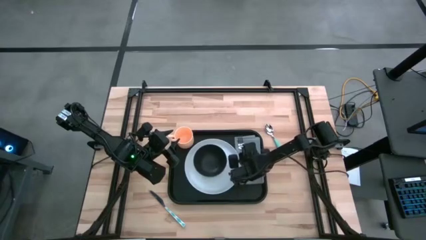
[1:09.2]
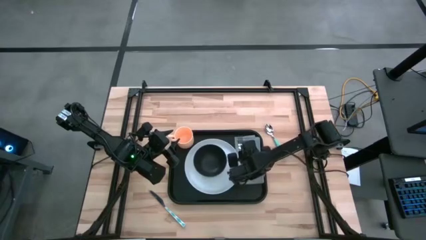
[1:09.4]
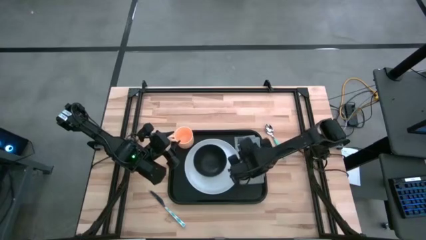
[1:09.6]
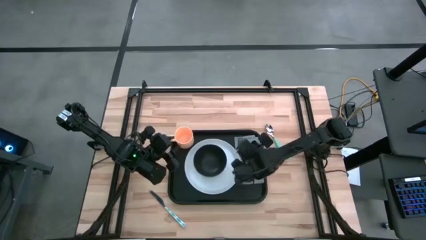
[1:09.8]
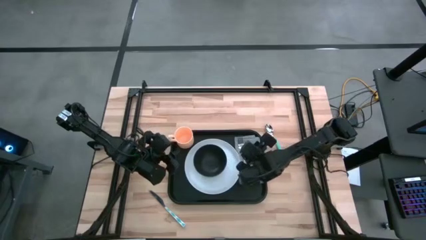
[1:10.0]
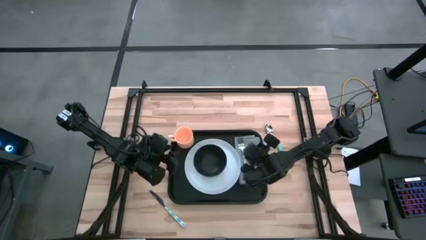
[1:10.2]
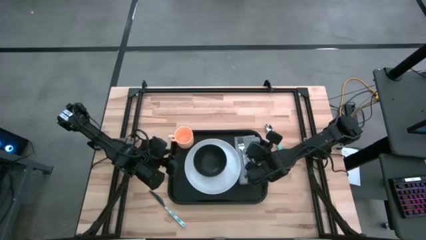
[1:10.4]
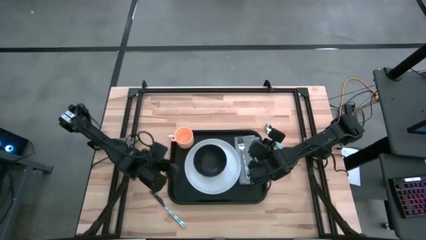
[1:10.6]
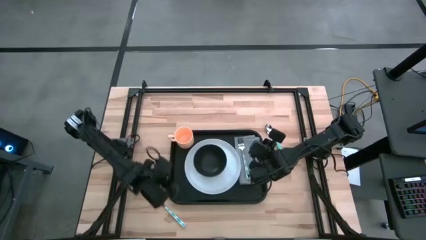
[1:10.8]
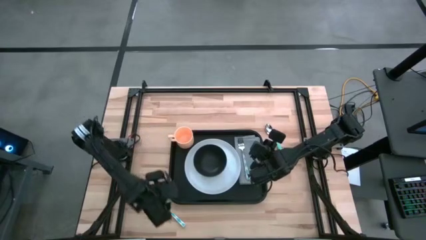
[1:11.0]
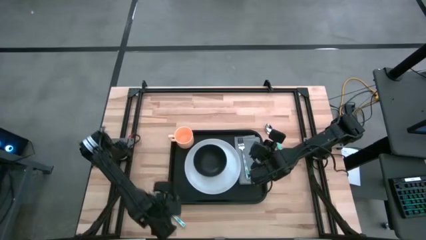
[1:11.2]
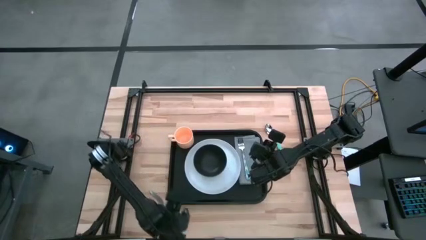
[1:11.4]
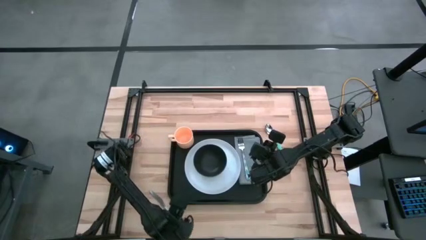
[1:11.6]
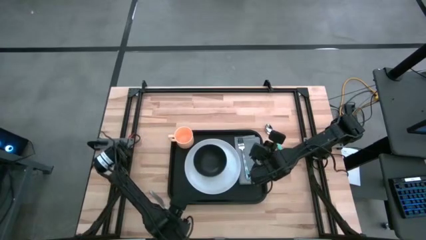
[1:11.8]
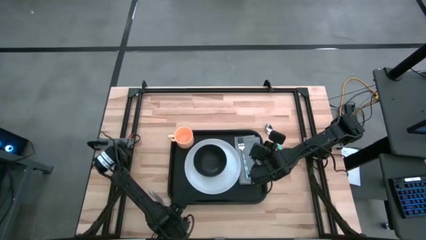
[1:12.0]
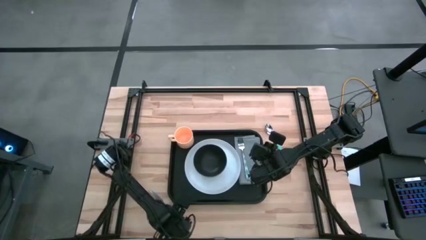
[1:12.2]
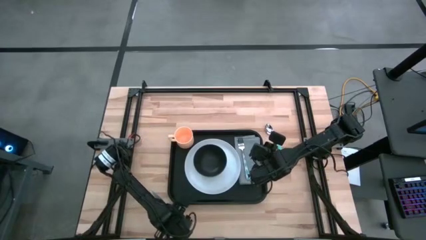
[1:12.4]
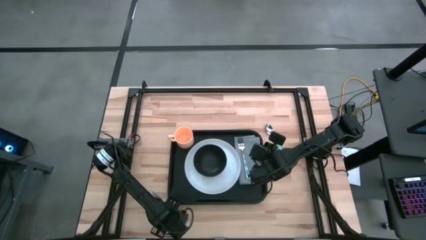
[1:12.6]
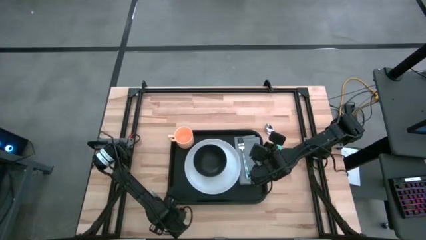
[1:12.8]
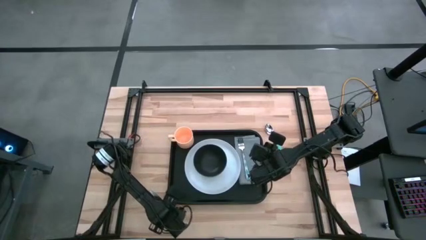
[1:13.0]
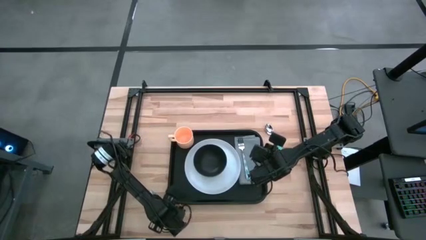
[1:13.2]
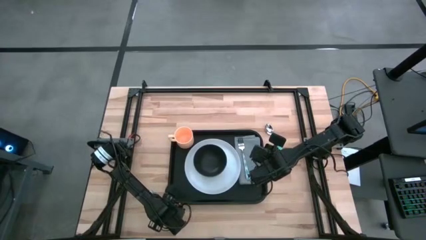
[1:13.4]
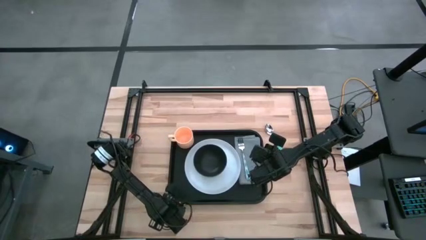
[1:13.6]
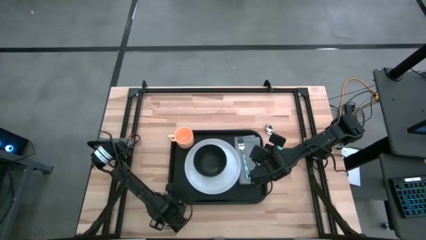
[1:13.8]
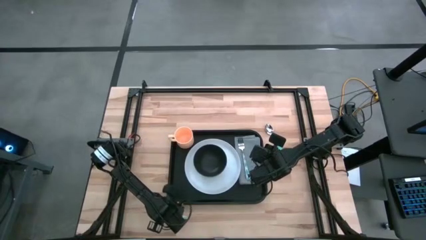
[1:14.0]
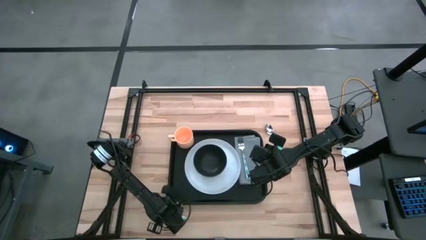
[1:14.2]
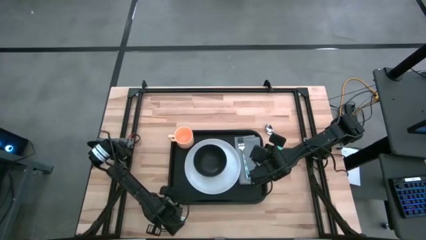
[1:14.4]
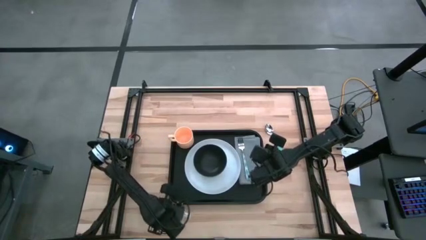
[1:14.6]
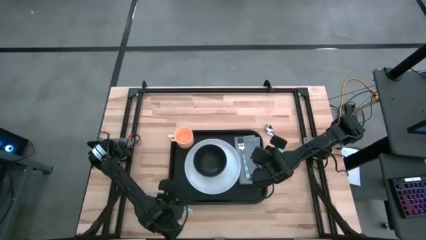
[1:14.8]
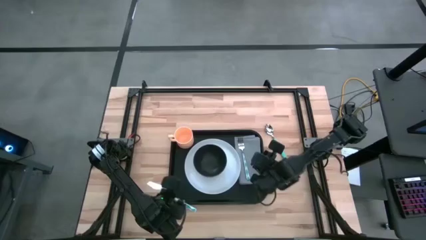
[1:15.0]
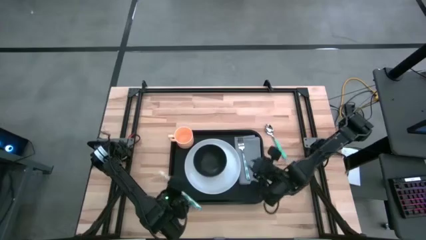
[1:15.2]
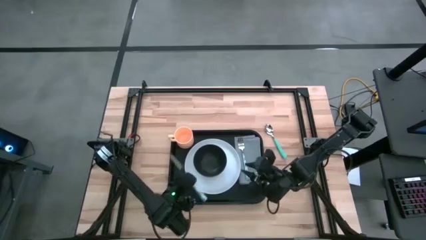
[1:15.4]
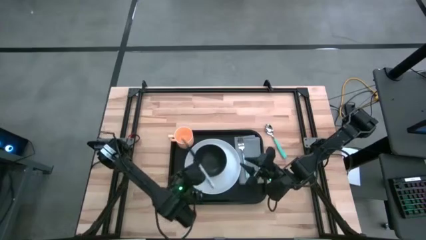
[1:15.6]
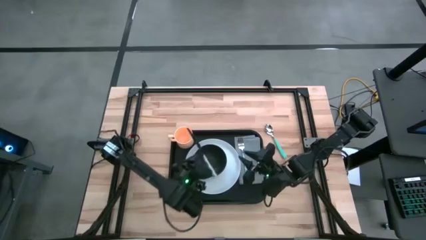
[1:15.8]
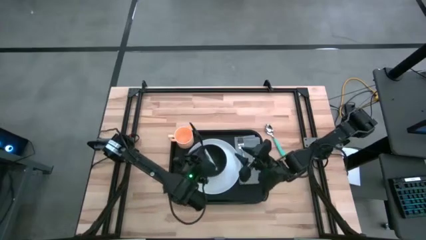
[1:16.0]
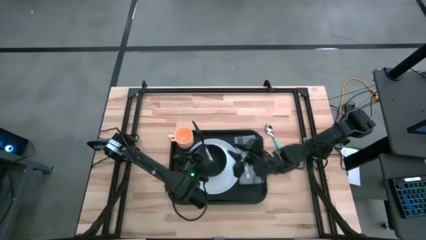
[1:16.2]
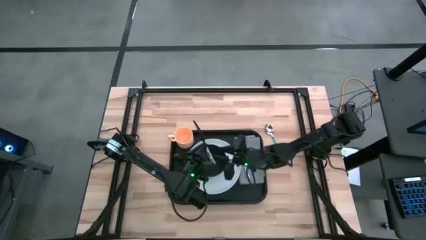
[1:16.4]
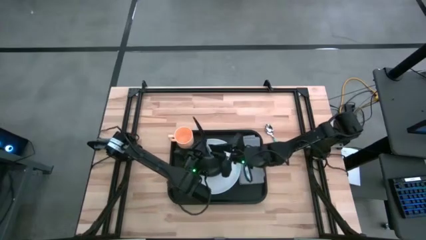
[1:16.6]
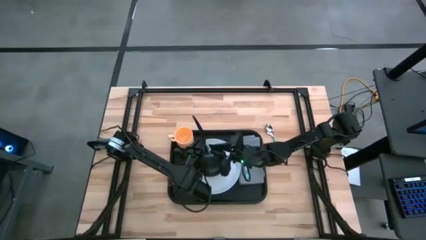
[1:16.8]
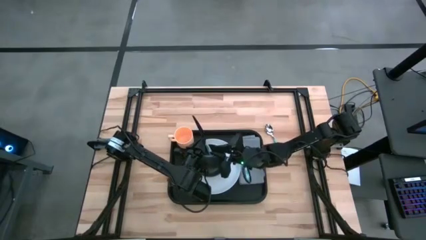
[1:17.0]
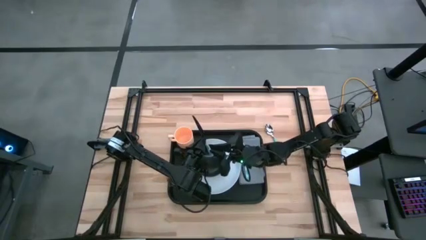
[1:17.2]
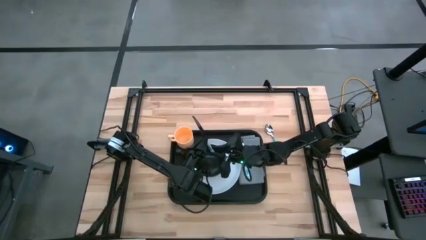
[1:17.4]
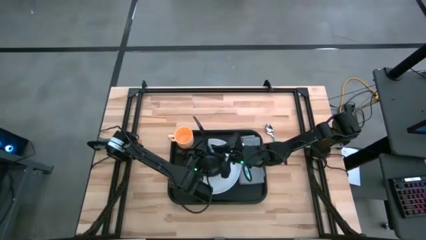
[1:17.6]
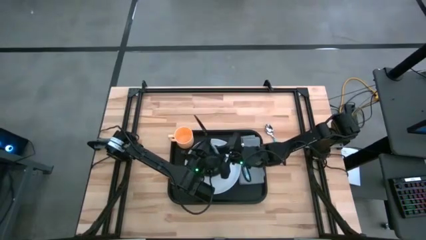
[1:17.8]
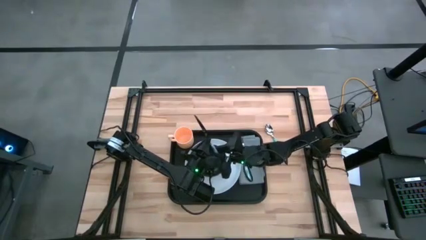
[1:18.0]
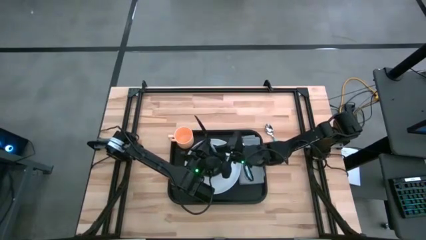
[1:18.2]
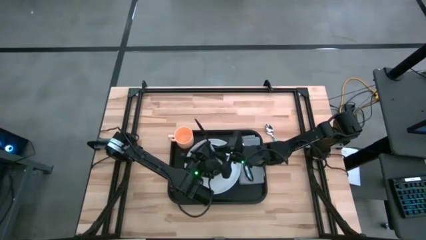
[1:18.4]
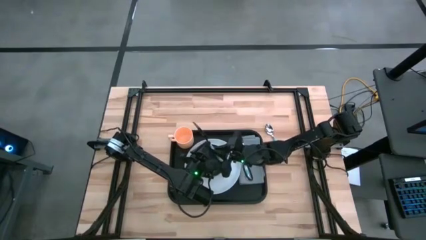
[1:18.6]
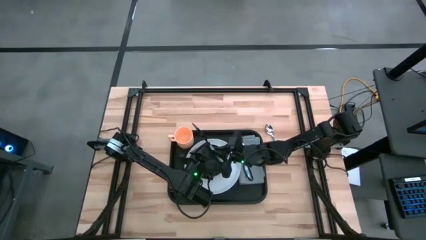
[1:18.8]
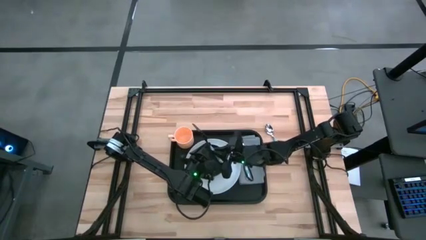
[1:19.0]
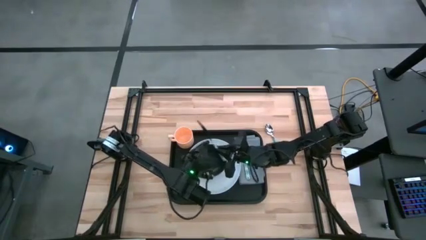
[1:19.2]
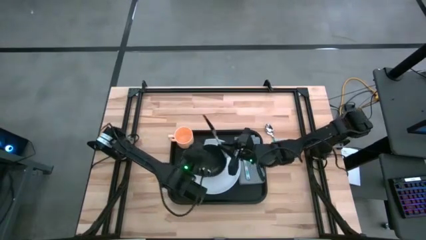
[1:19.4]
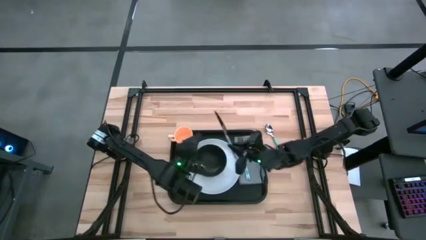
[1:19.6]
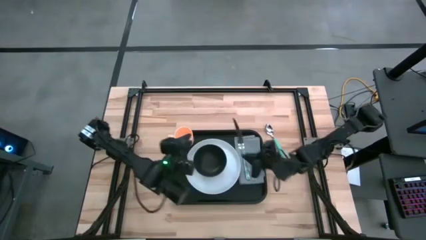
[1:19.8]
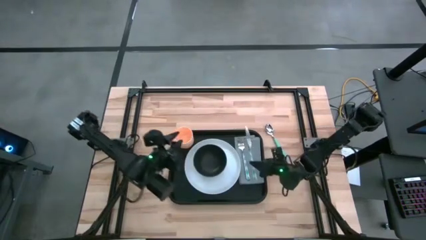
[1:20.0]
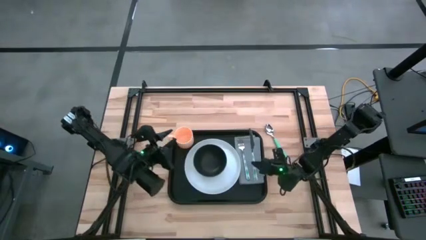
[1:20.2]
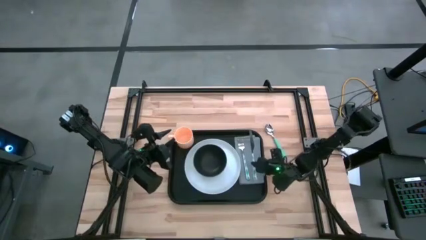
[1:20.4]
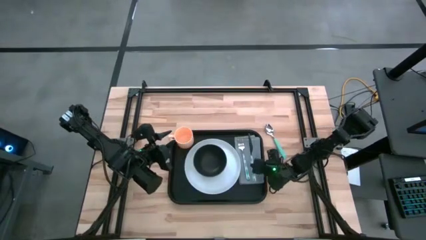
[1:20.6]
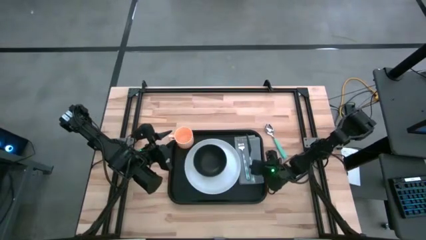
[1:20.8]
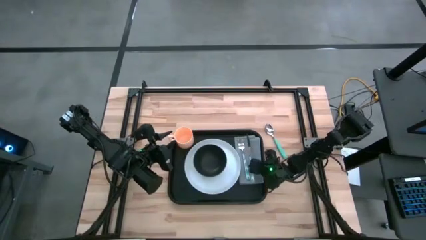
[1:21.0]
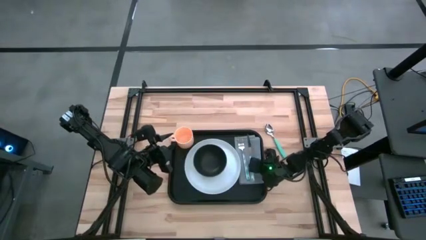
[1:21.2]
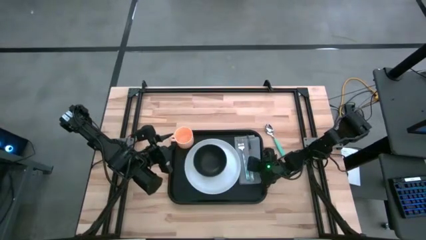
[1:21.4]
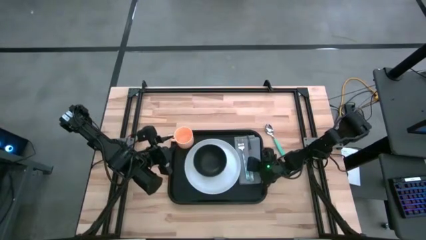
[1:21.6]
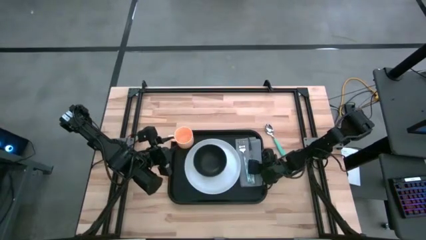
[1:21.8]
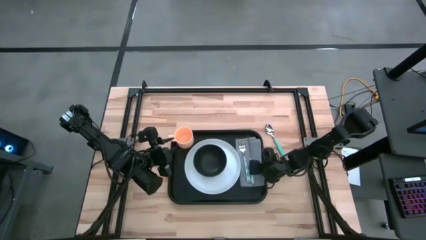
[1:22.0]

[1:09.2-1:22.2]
Task: Set up tray
Put the blue spoon on the gray napkin to the right of the blue knife

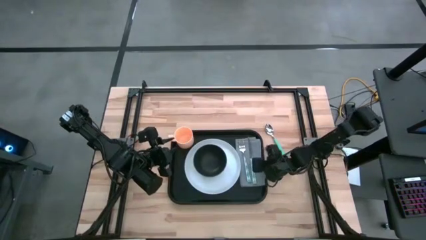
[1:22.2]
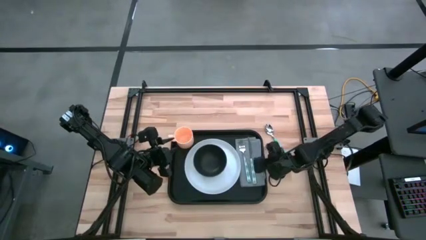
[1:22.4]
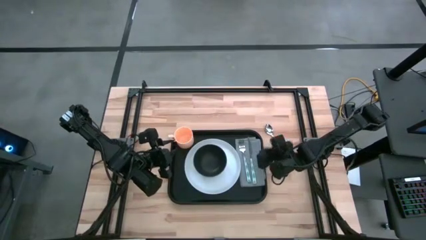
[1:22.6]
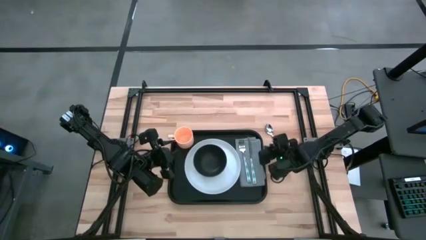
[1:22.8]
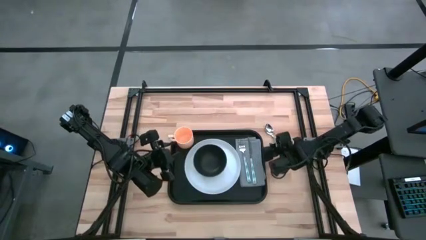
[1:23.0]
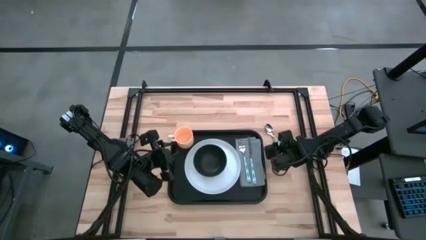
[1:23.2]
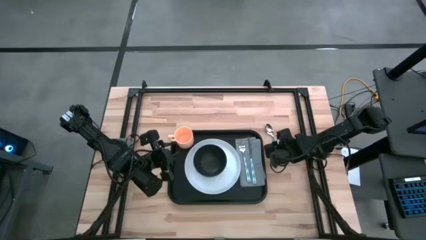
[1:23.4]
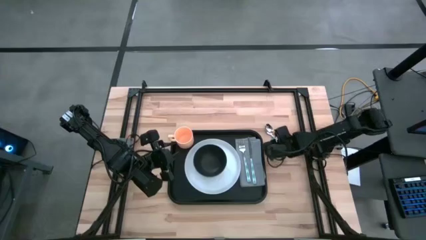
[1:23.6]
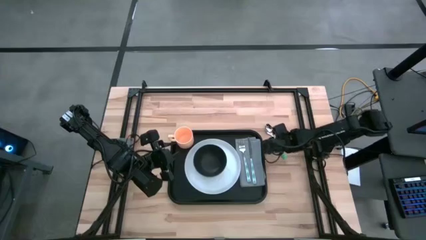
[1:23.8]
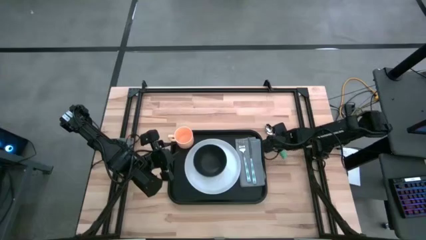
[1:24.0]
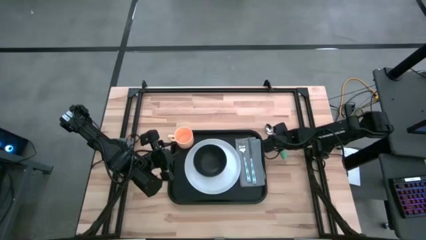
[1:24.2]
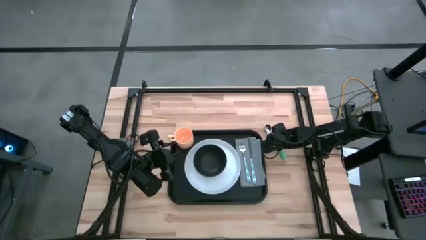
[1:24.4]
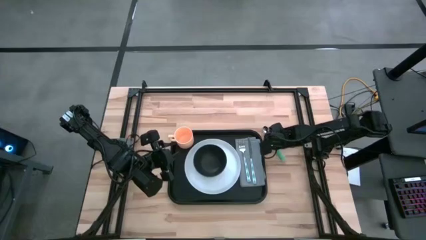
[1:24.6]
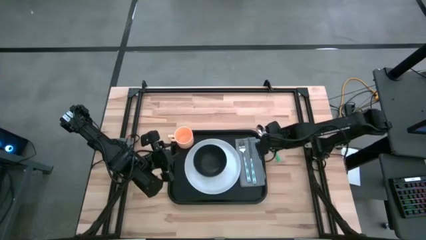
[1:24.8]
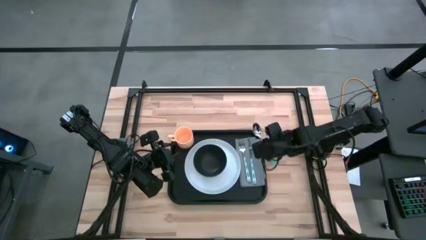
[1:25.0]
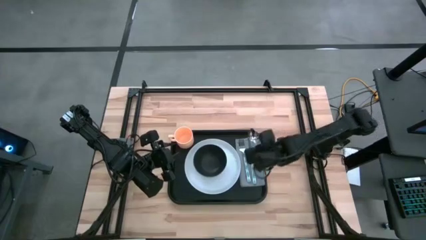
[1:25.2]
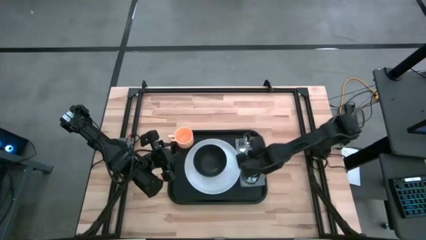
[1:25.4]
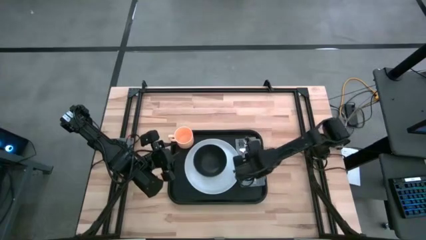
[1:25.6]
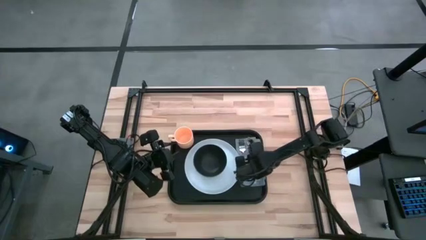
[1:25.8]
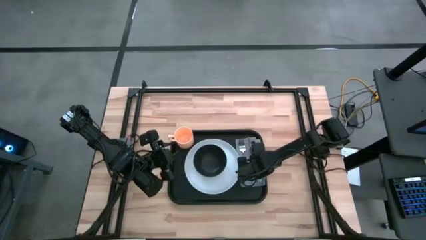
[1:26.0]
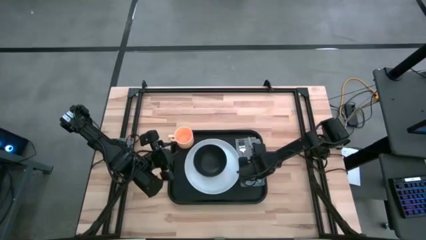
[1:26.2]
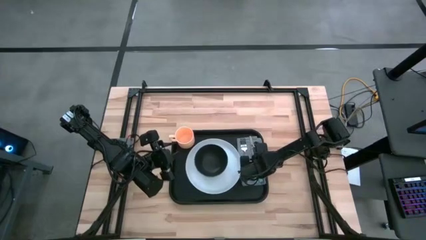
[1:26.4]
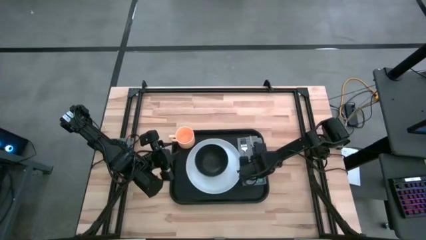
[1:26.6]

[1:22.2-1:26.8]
Put the blue spoon on the gray napkin to the right of the blue knife
